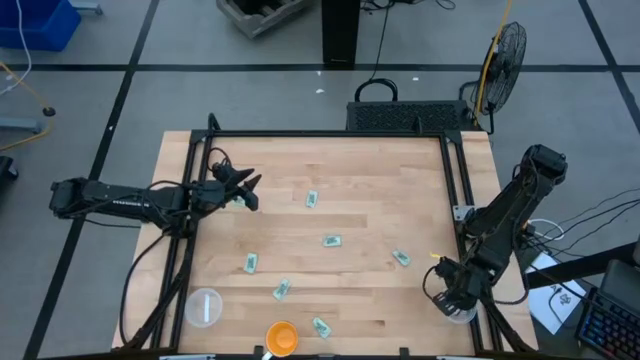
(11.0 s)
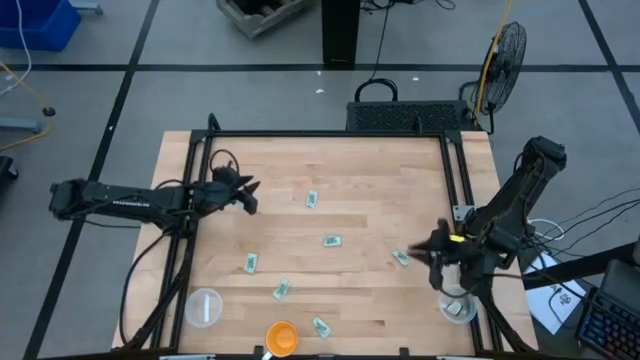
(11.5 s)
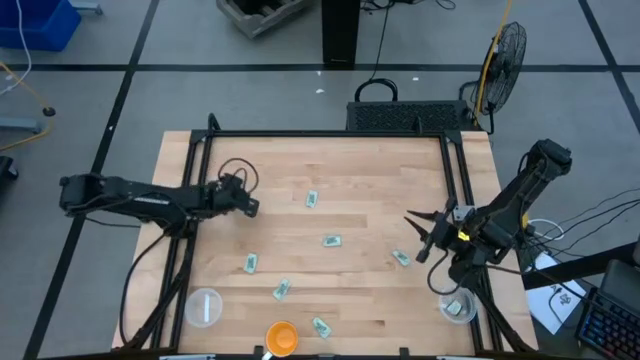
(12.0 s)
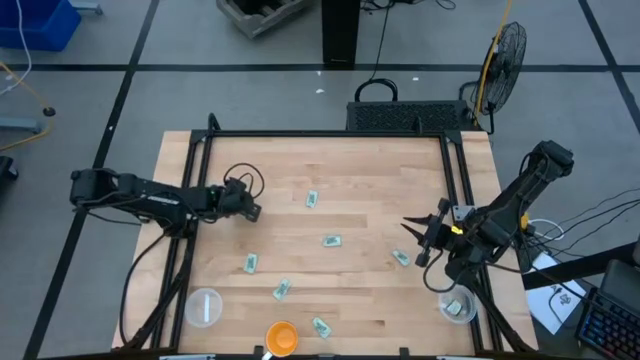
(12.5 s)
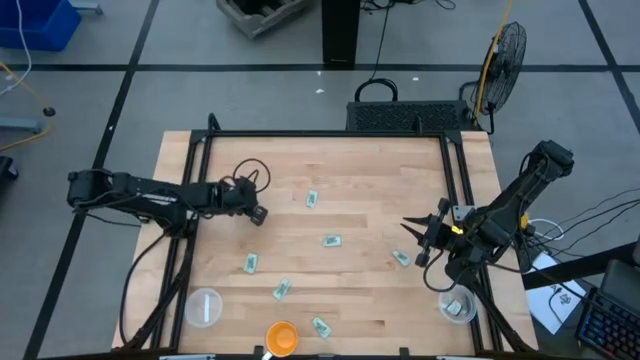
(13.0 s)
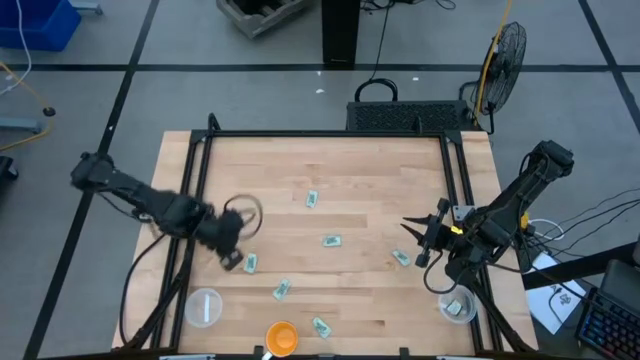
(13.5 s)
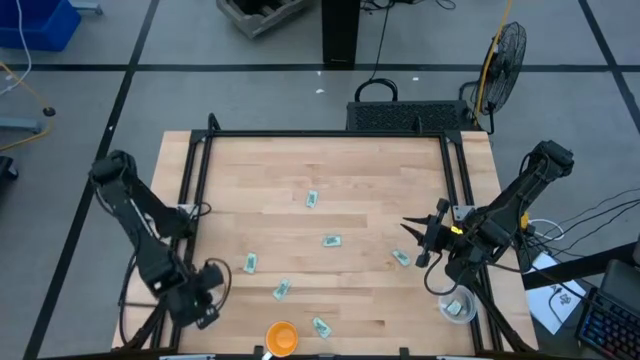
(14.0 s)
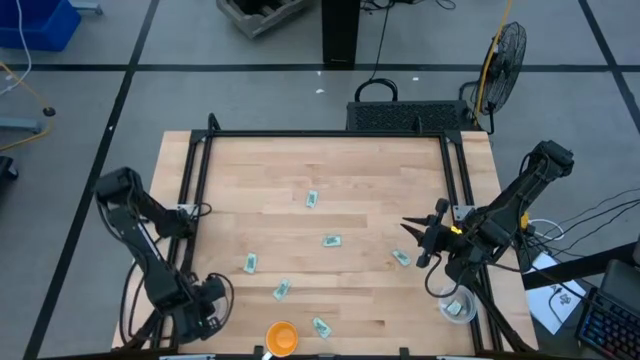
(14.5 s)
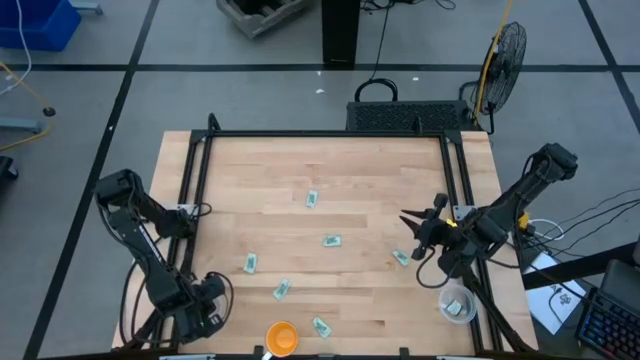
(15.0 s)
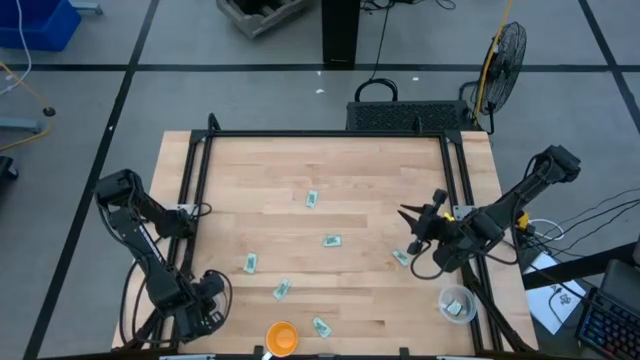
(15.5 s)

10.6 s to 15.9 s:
Task: Pick and place Stevia / Truvia into bins
Put the stevia packet into the left transparent container

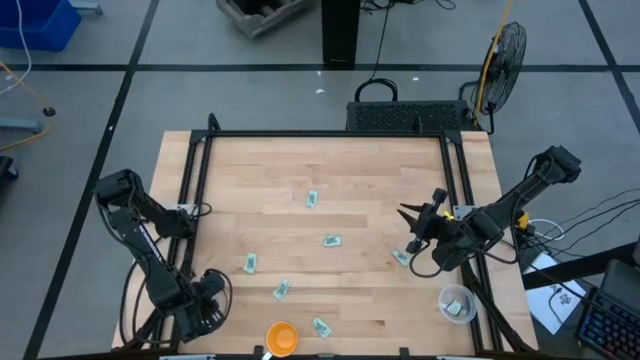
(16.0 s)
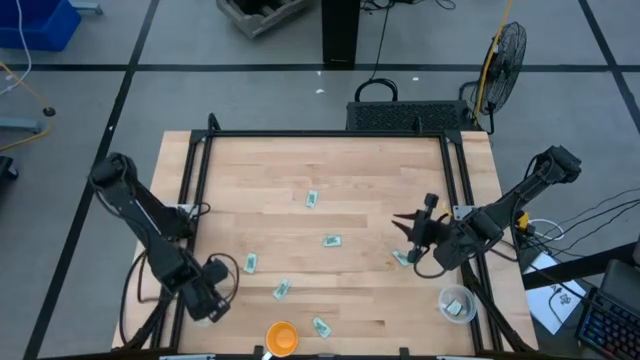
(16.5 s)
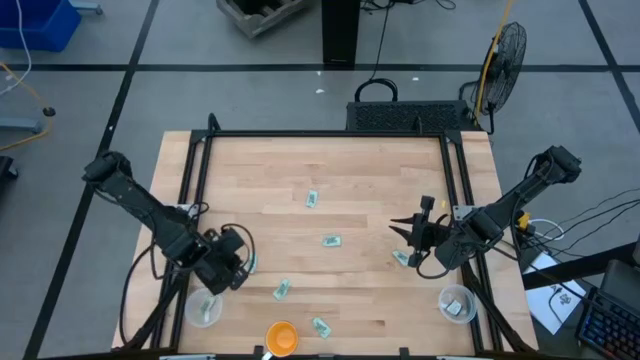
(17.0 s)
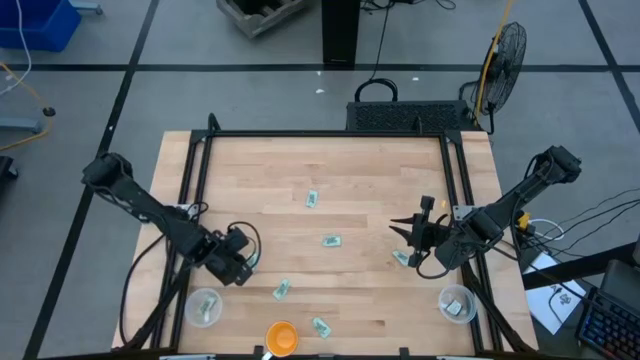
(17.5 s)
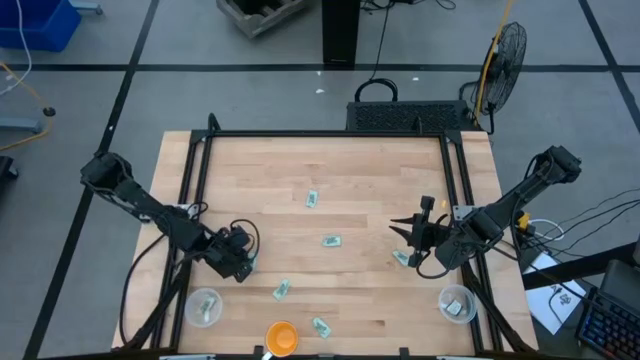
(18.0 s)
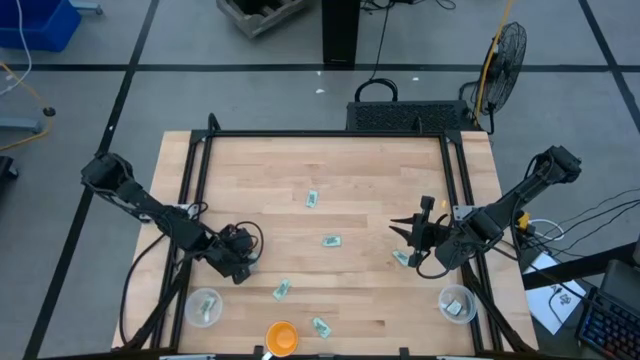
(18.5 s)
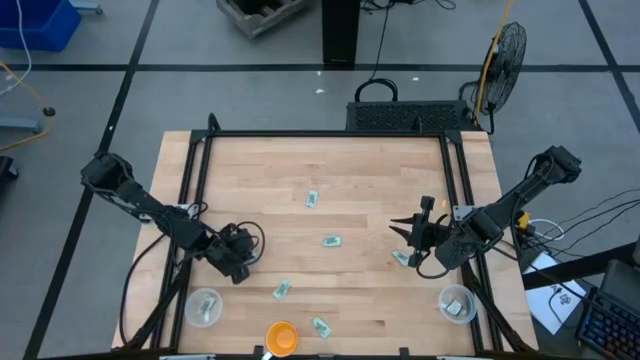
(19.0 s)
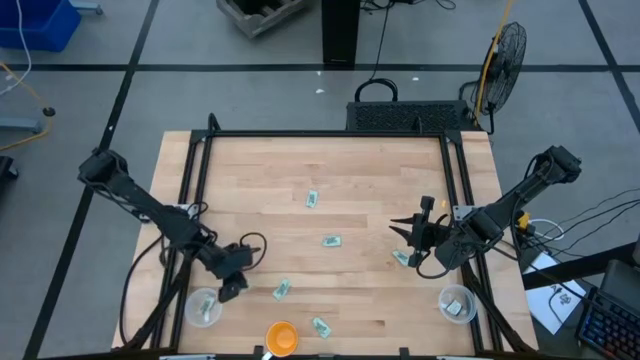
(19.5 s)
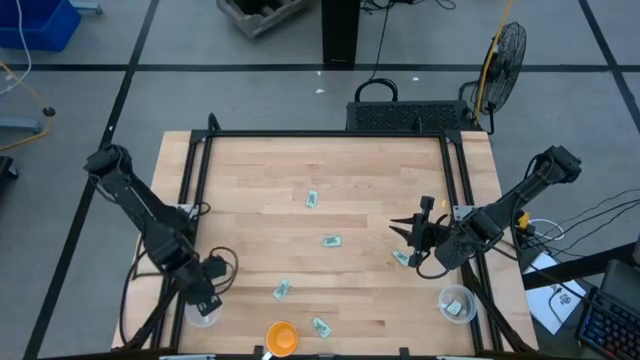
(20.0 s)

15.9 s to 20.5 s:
Put the stevia packet into the left transparent container

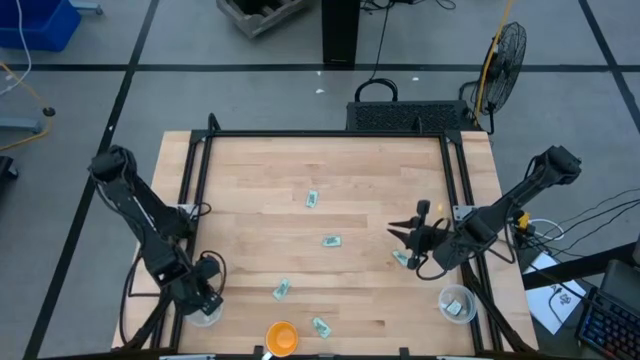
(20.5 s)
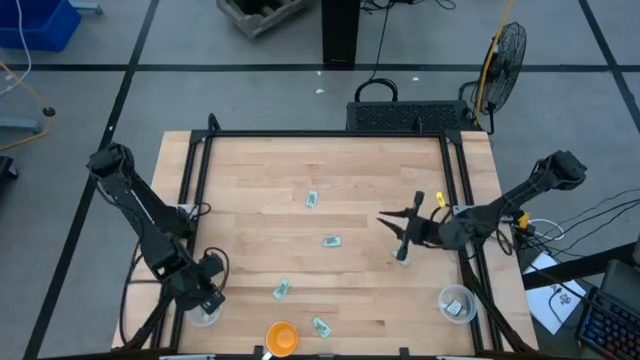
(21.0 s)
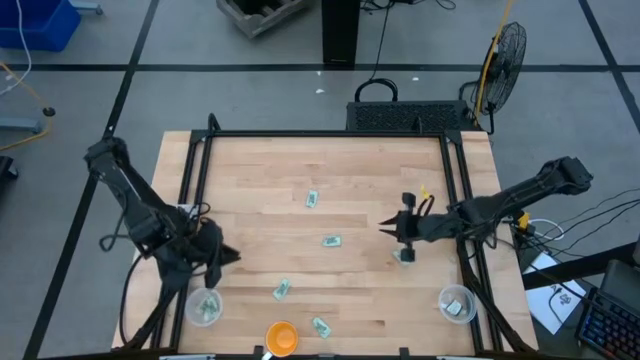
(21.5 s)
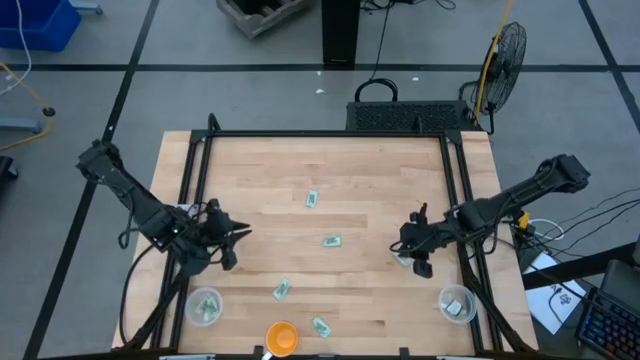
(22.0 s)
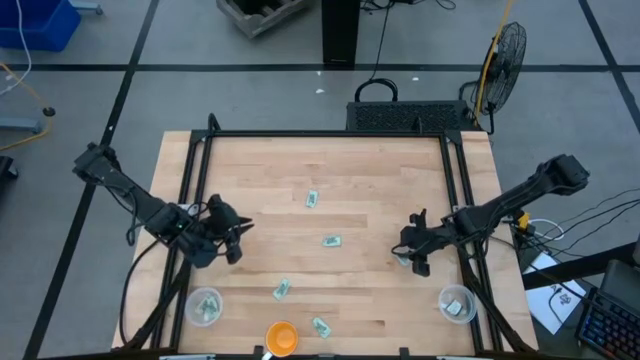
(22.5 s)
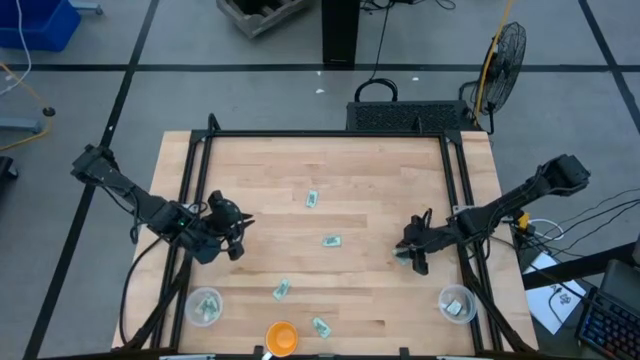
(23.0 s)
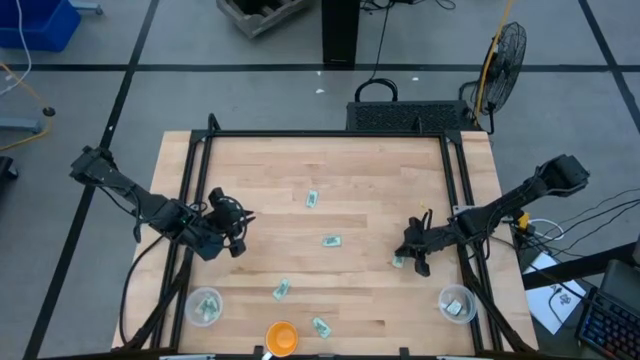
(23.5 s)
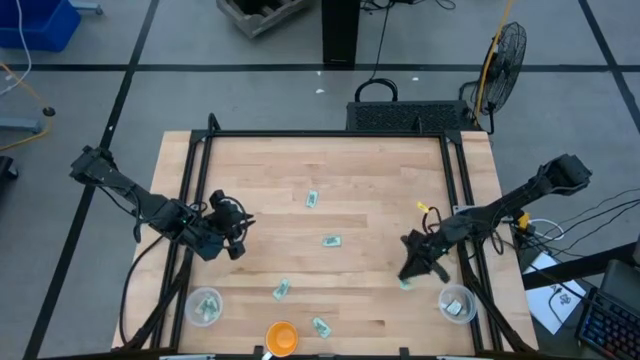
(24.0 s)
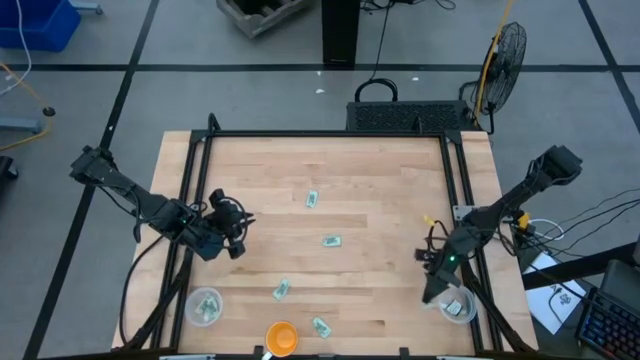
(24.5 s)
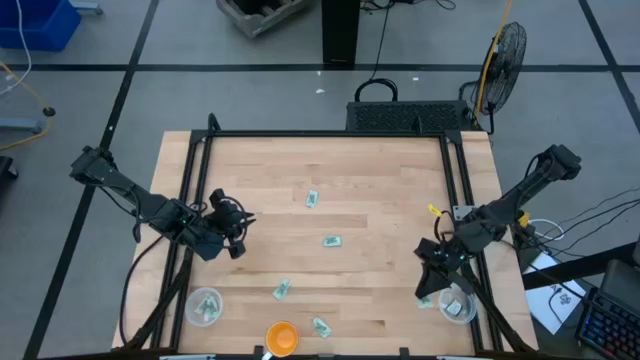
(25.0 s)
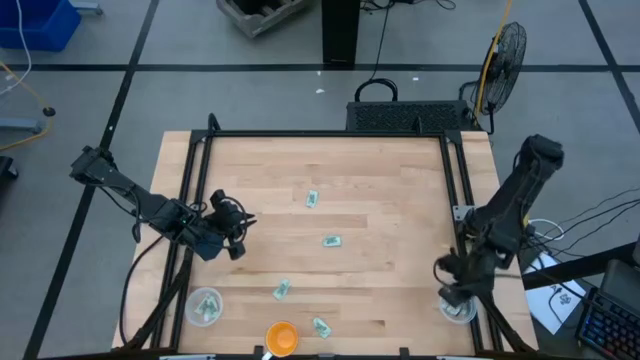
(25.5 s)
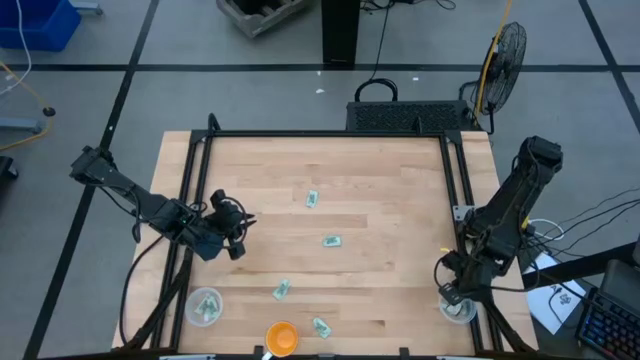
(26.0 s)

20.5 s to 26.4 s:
Put the stevia packet into the right transparent container

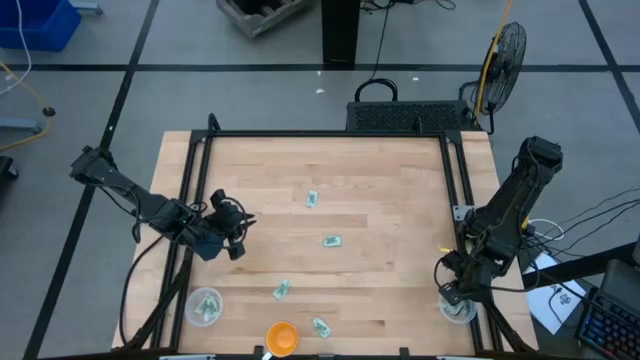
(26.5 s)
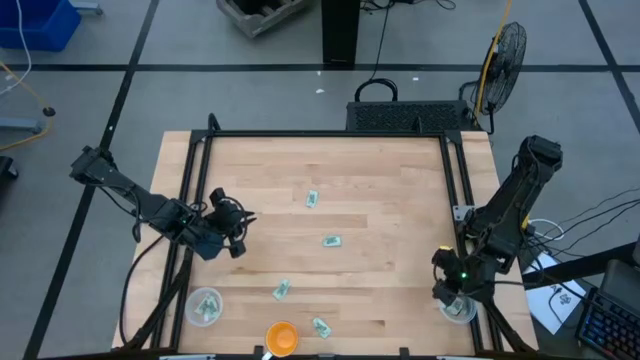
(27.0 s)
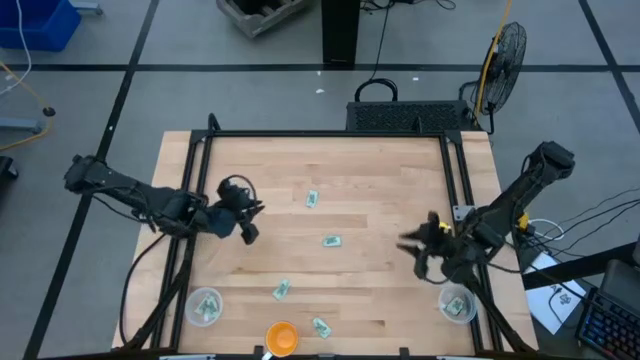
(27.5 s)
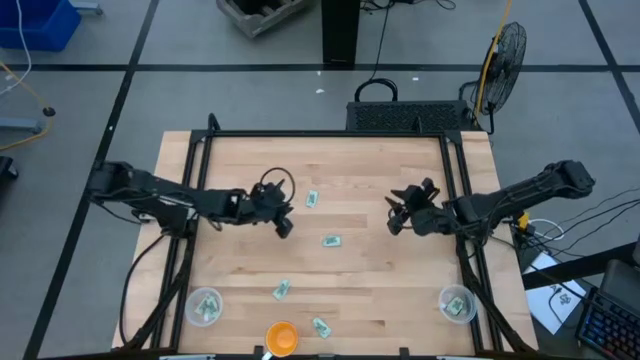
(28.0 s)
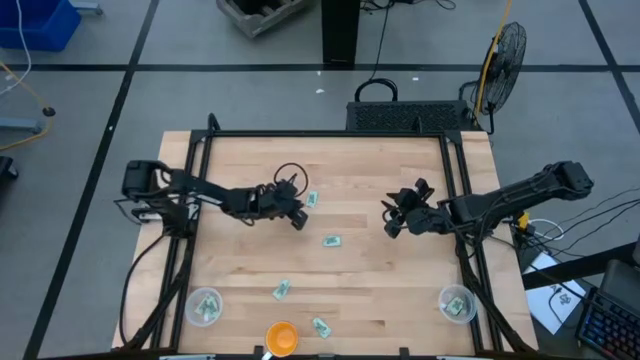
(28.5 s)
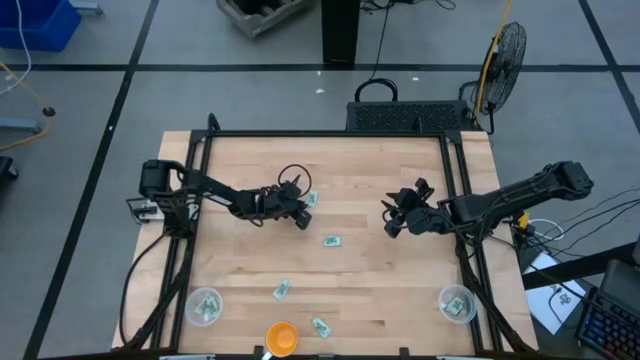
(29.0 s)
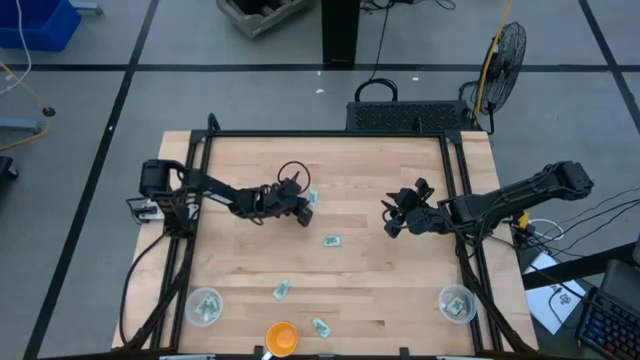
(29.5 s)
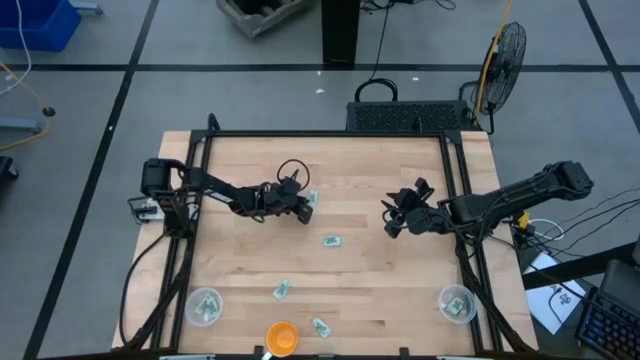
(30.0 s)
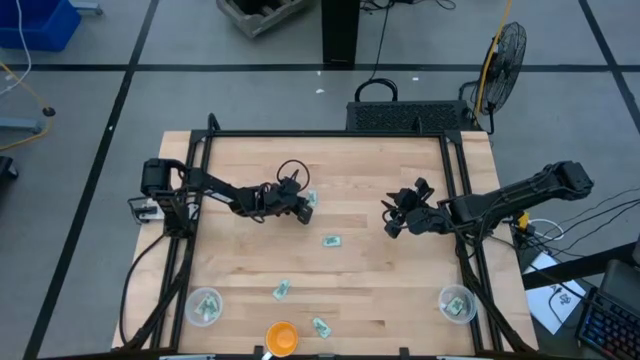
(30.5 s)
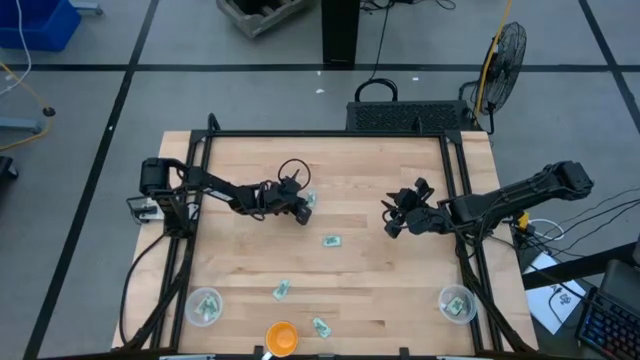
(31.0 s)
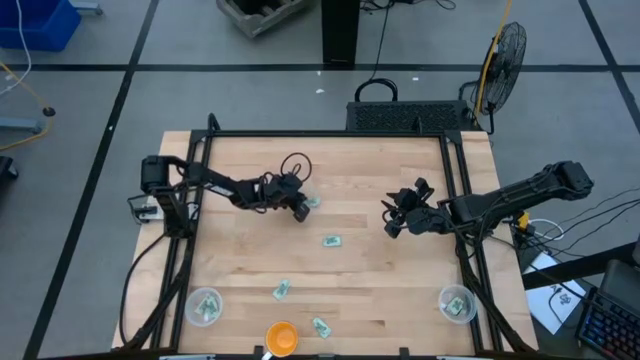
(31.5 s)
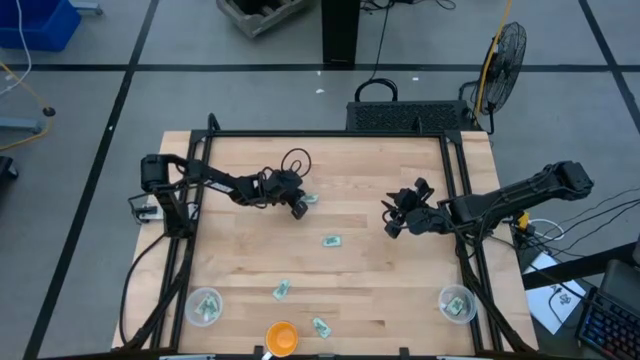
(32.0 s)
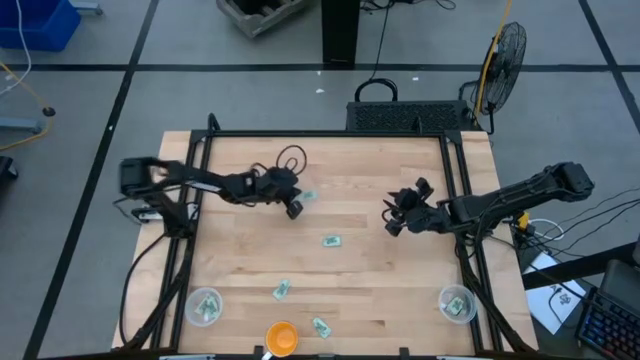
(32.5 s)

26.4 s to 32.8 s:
Put the stevia packet into the left transparent container
